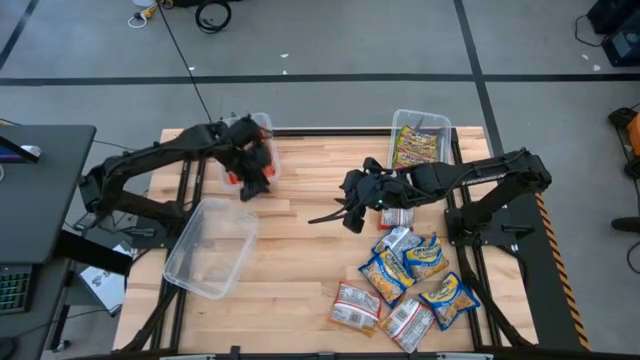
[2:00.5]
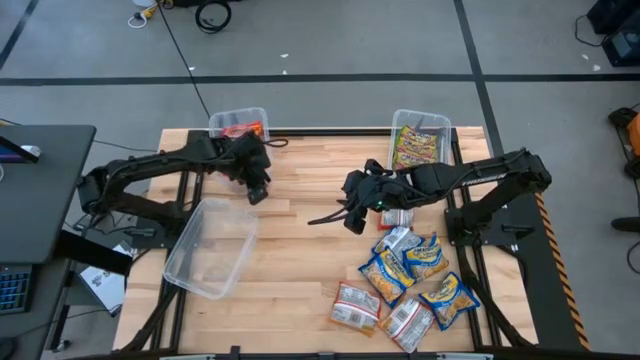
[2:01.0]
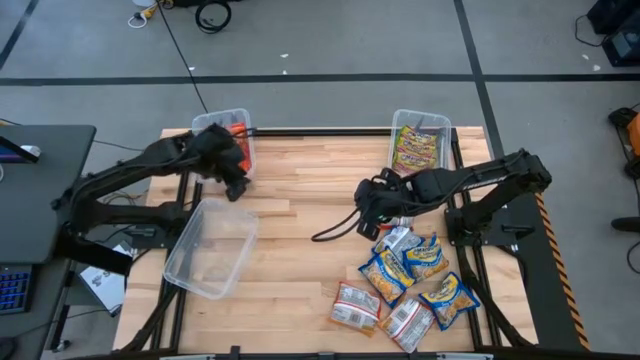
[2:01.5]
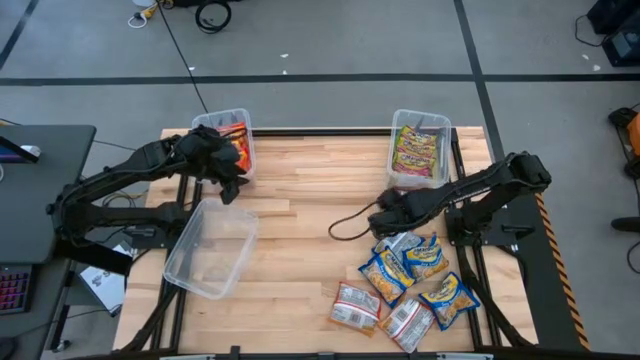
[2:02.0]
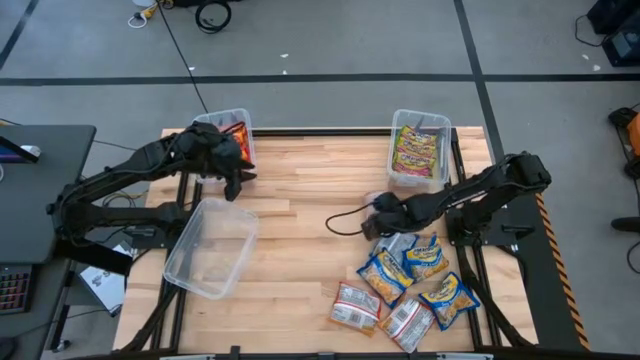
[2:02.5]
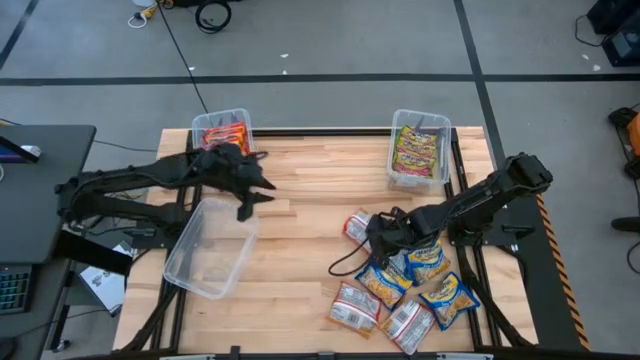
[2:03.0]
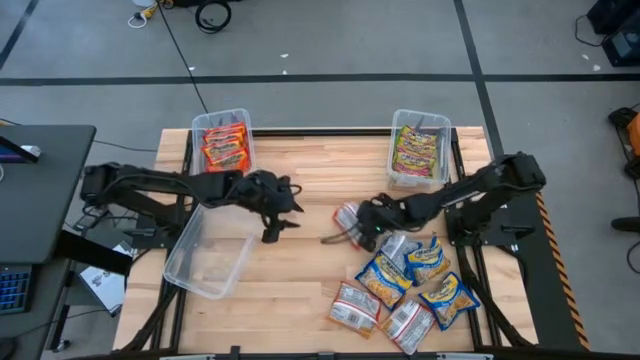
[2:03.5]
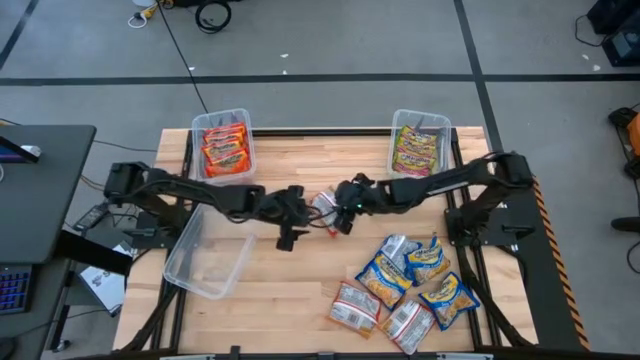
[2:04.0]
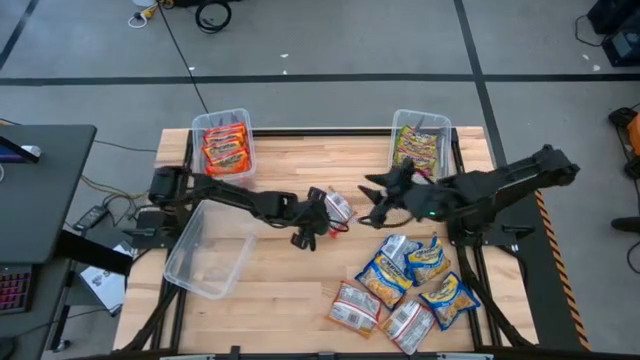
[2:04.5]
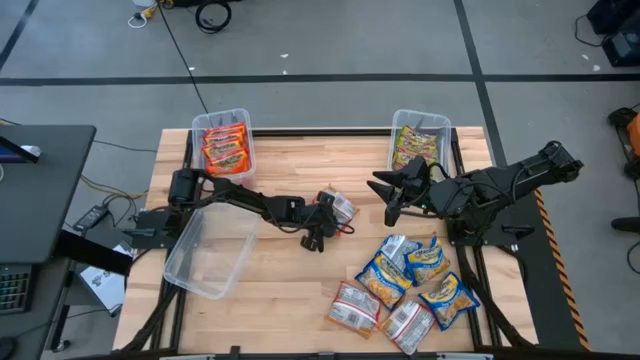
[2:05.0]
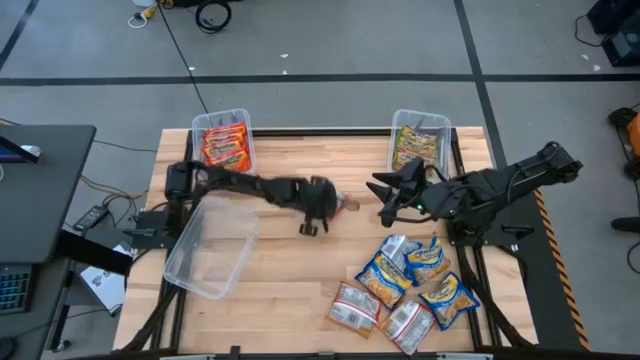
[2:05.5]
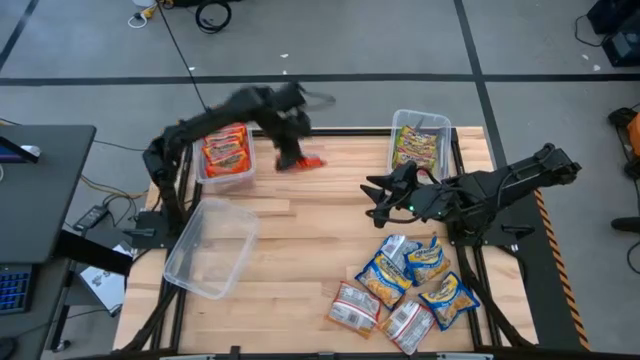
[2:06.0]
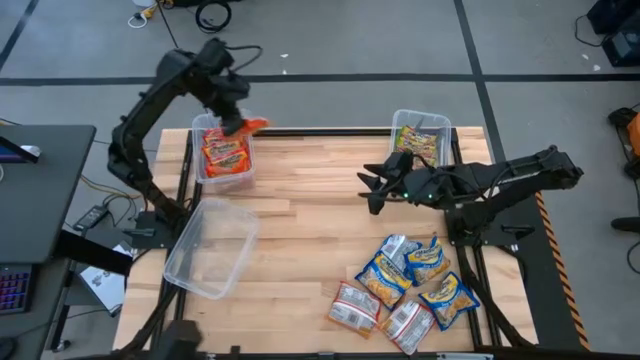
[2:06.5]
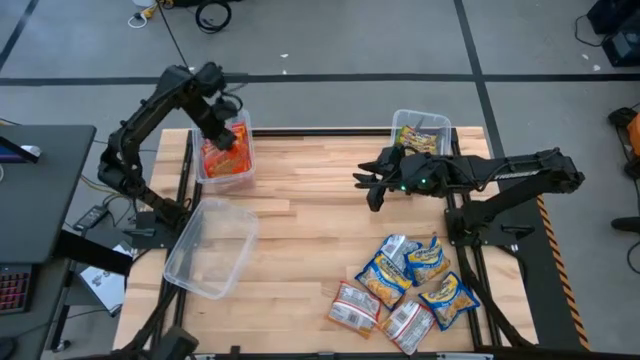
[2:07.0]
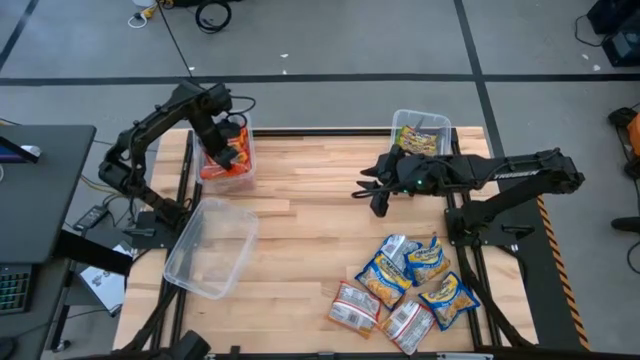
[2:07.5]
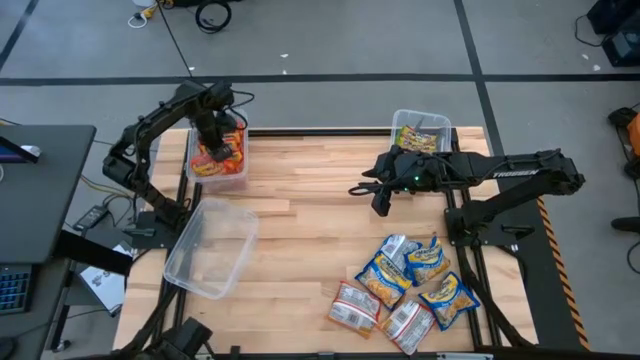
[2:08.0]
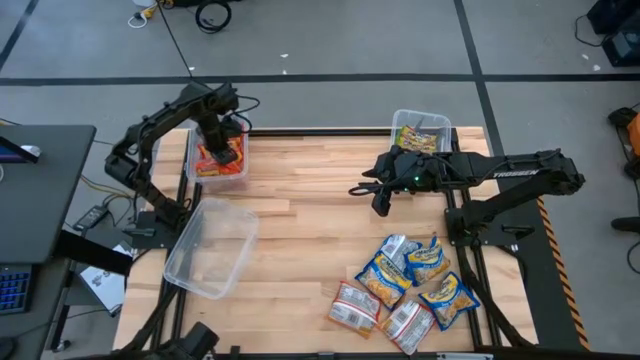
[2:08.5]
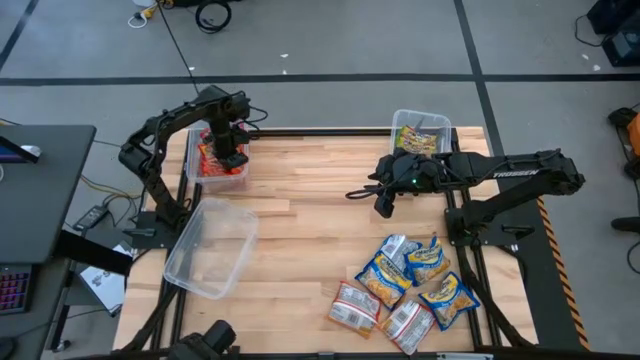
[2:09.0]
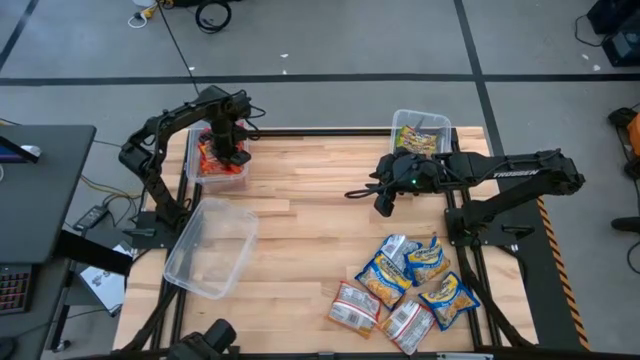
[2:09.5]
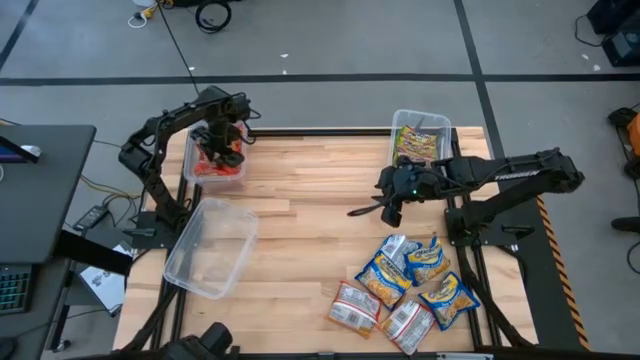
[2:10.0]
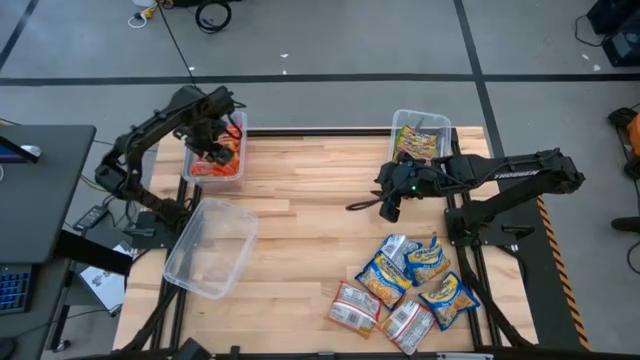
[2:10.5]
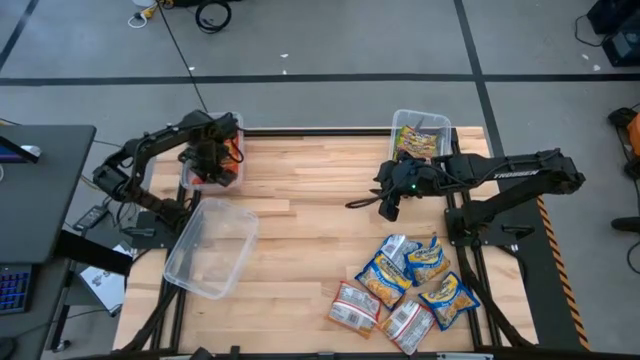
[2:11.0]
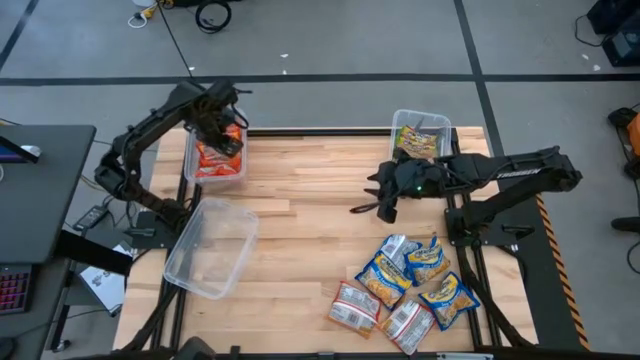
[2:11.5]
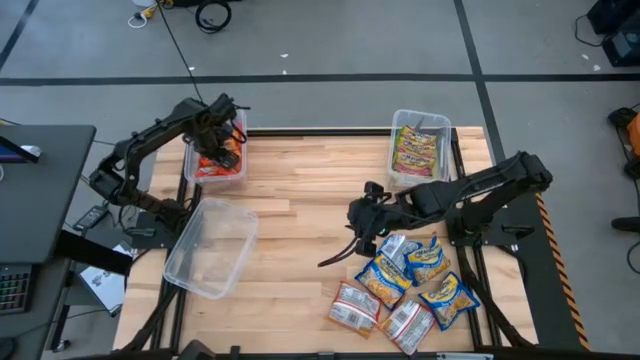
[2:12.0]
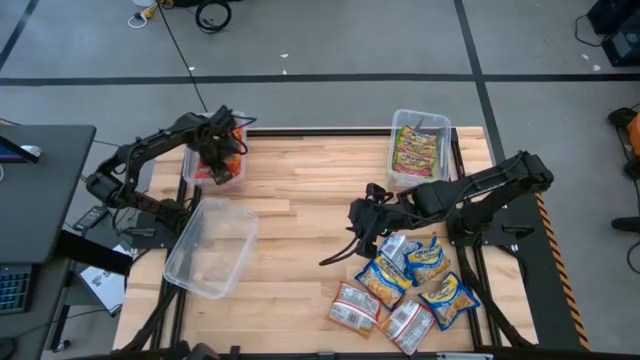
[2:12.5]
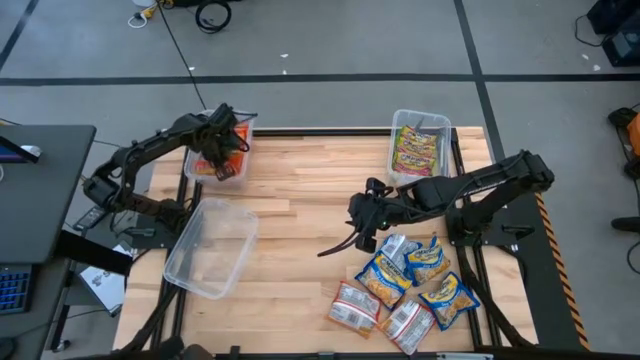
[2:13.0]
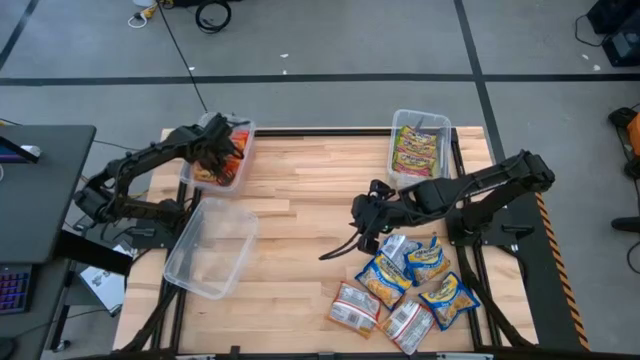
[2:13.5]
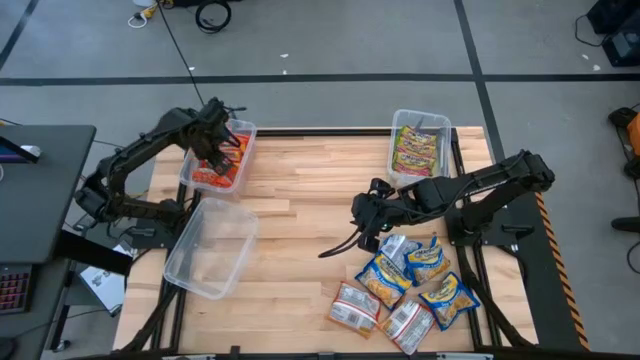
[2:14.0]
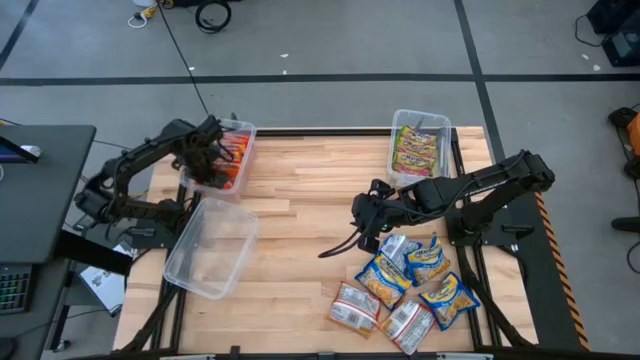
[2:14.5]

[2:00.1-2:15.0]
Task: Sort Maruchan noodles
Put the orange noodle pack into the top left transparent bin

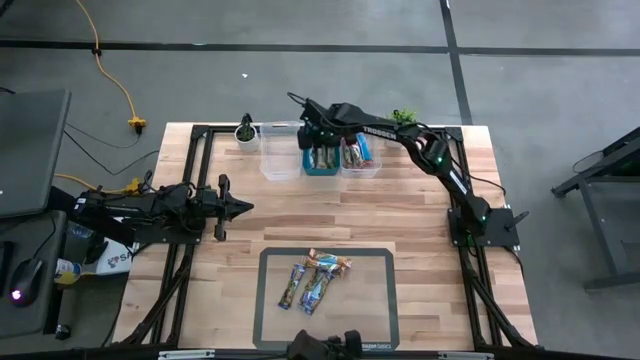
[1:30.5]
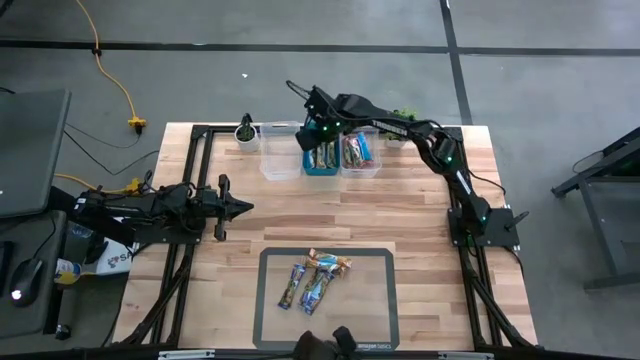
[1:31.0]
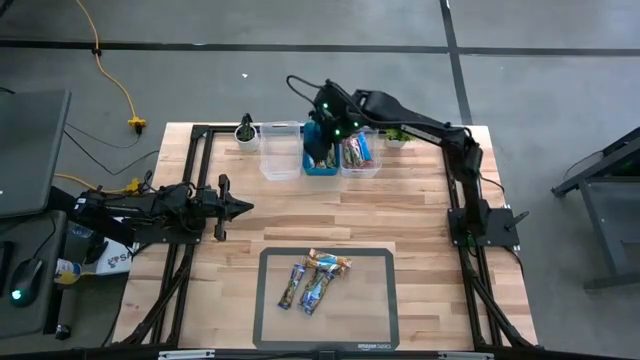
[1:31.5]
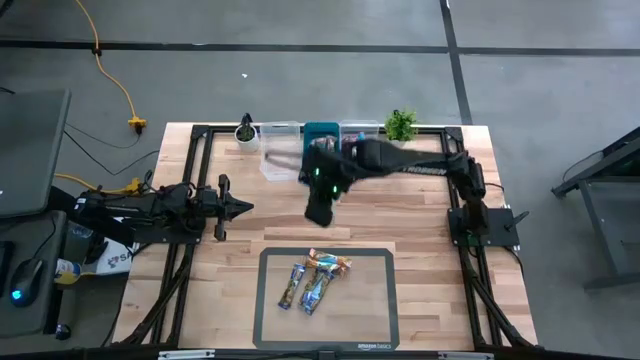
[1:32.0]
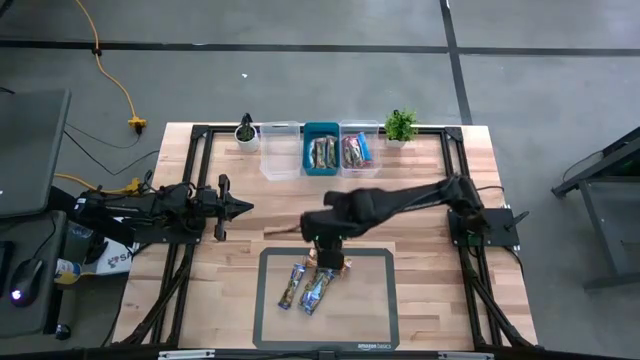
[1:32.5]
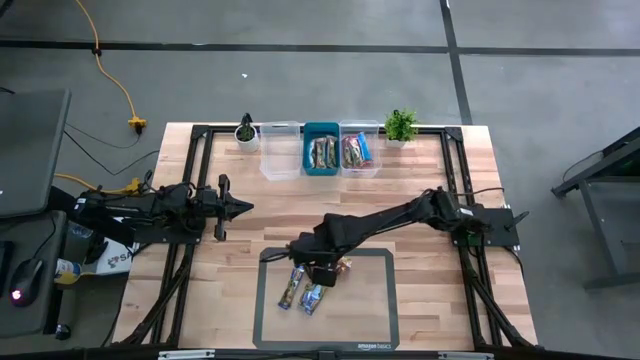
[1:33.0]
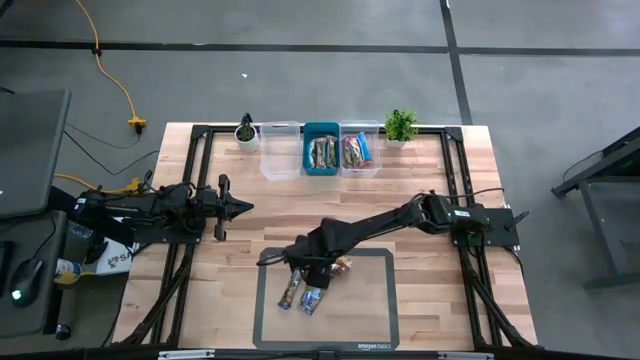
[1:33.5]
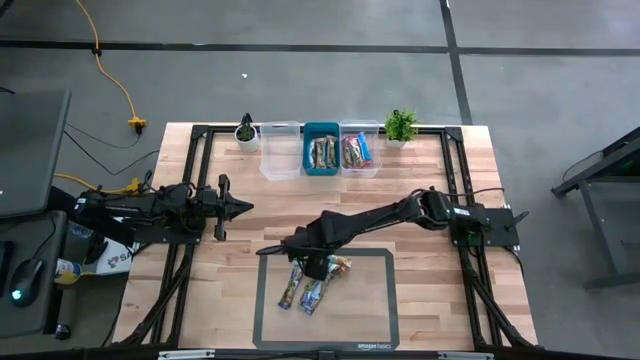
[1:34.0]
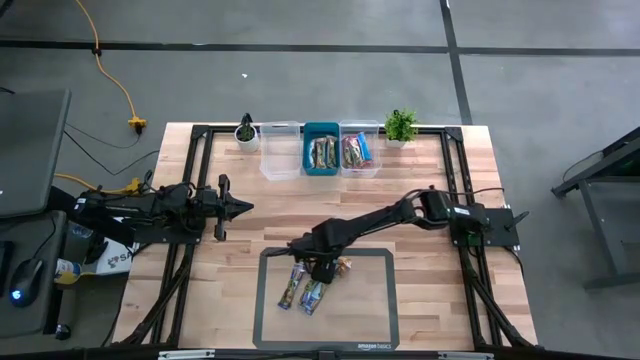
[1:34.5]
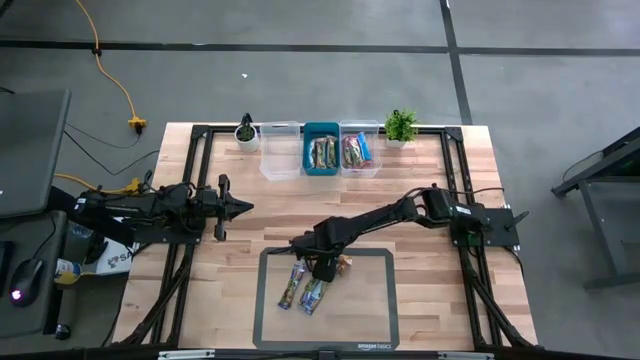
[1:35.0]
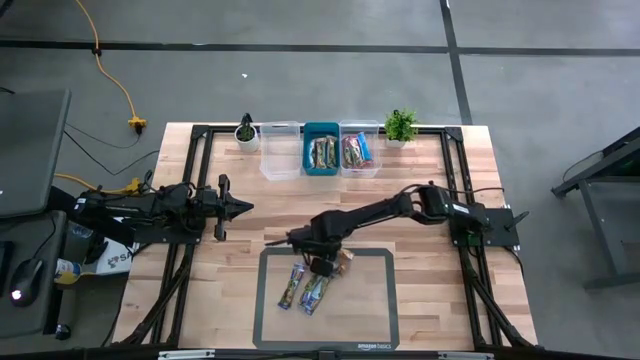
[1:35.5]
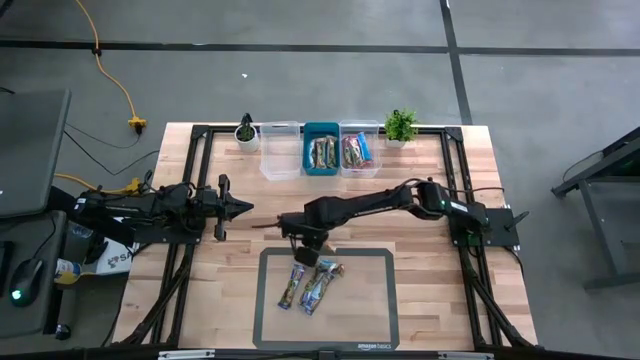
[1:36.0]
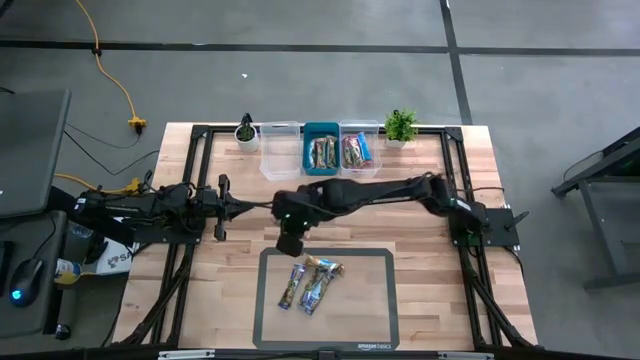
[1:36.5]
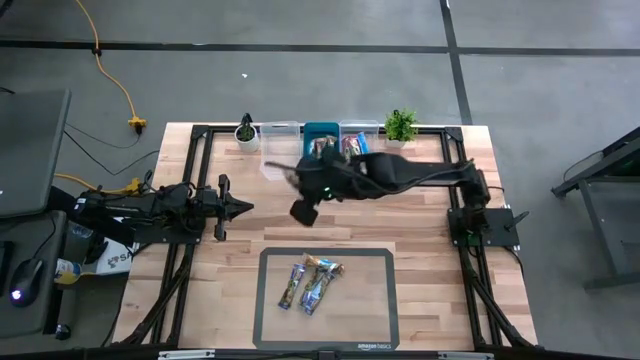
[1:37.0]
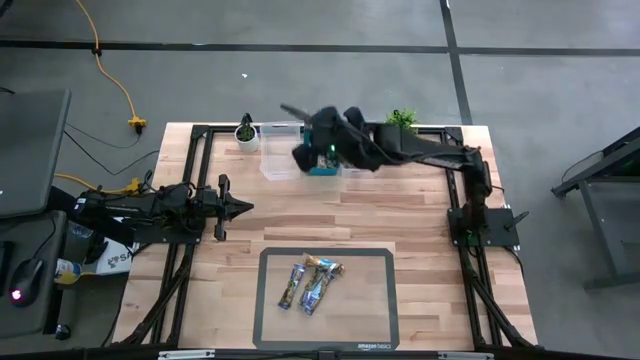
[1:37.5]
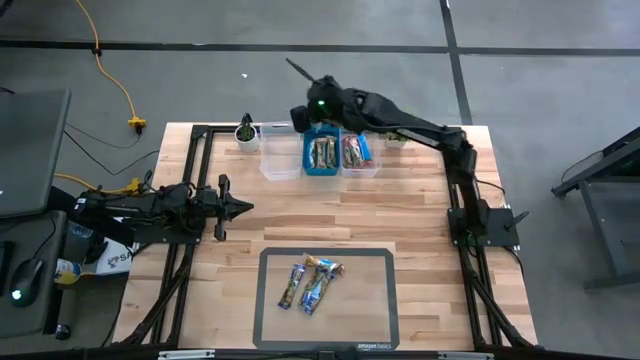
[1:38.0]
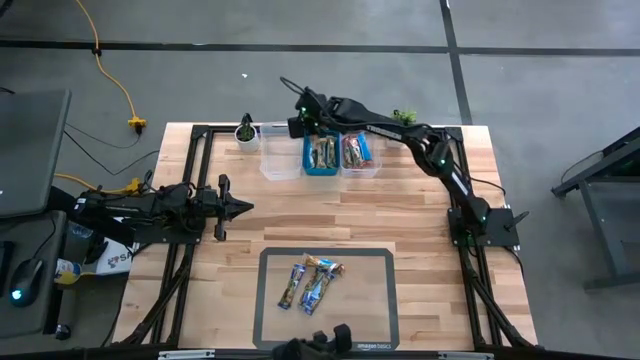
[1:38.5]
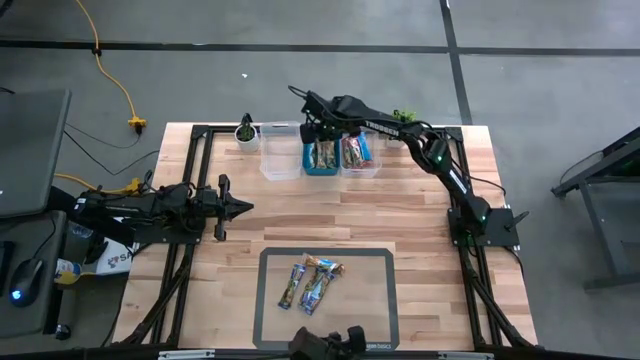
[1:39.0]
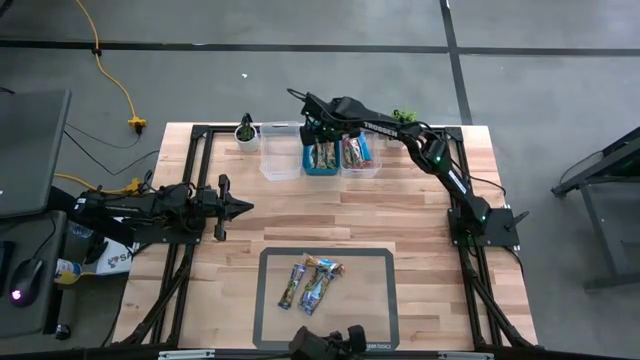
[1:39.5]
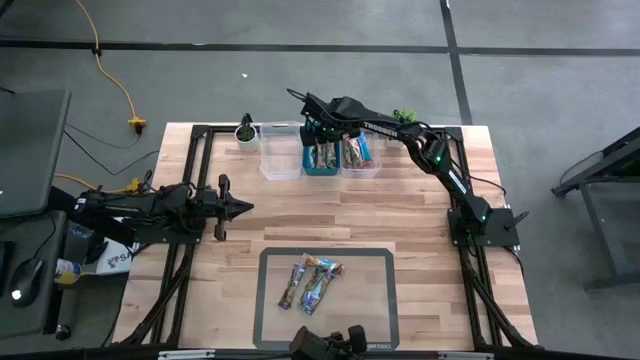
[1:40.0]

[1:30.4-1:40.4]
Task: Pick and place Granola Bars by type
Put the yellow granola bar into the blue bin
